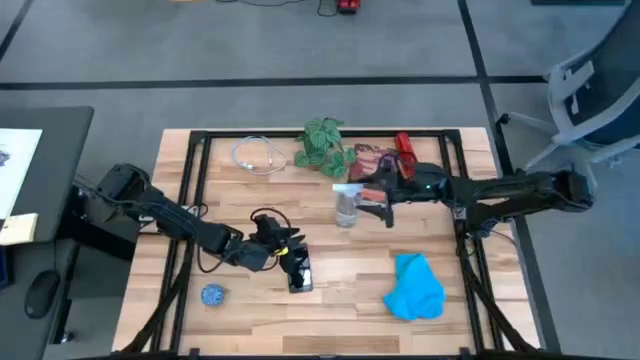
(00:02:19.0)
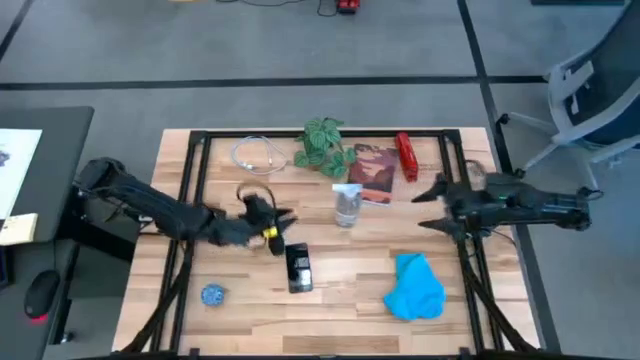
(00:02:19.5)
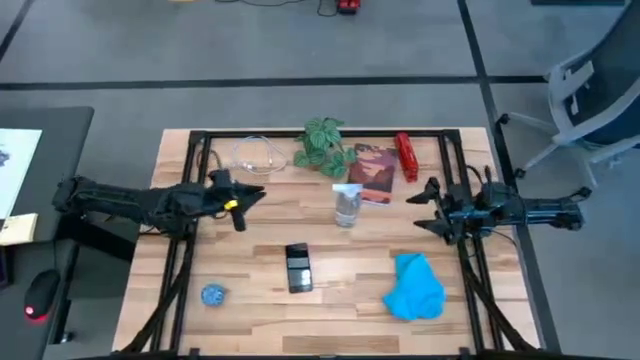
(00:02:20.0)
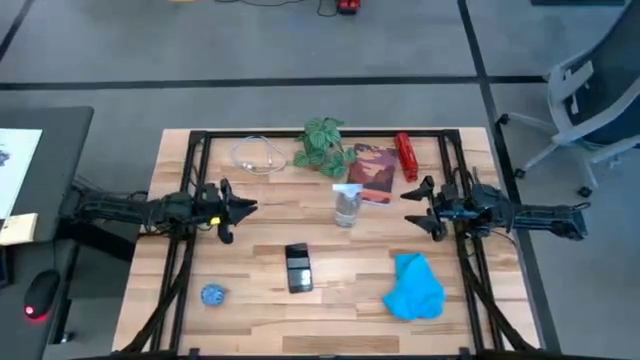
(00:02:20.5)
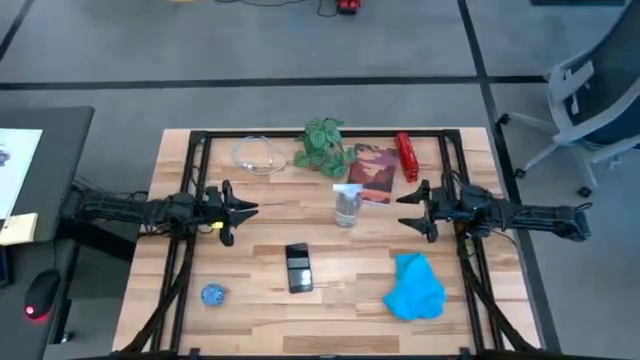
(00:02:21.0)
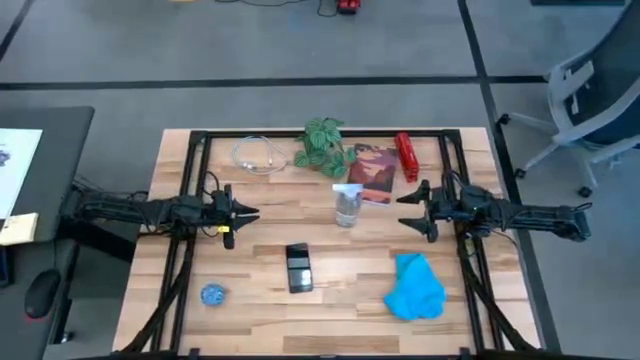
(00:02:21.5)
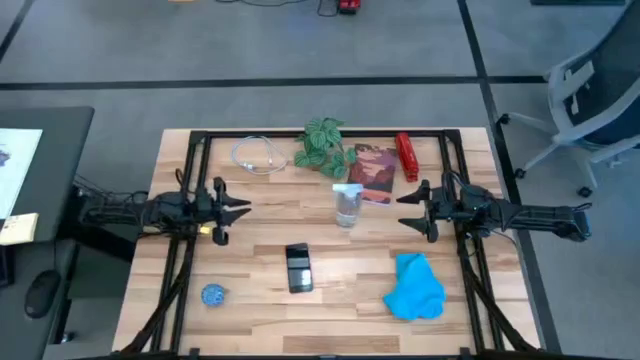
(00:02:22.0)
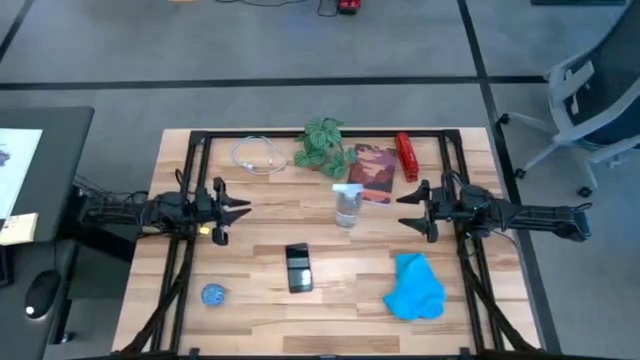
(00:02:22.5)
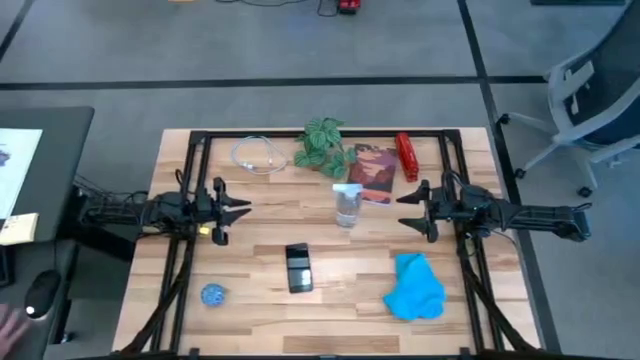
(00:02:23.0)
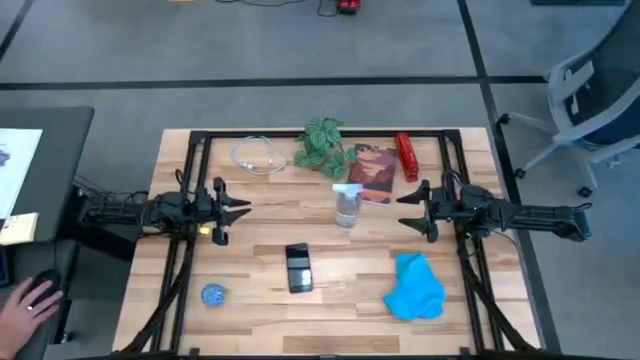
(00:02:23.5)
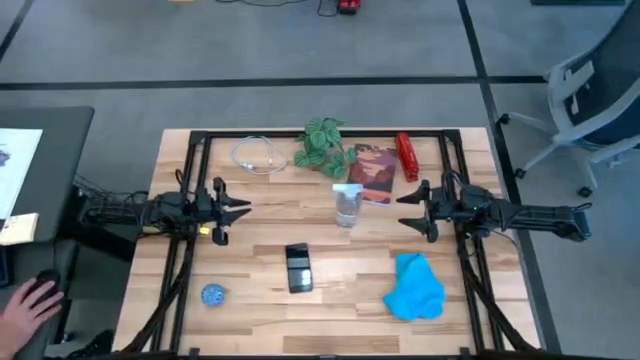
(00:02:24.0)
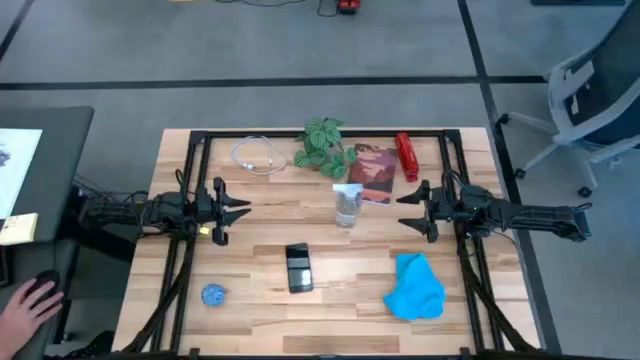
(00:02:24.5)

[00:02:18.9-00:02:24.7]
Task: Apply microfiber cloth
Return to Home Position

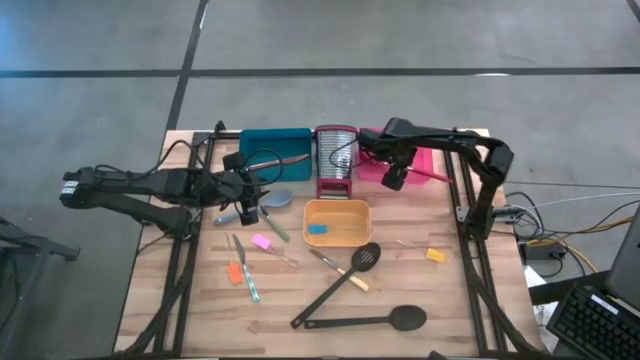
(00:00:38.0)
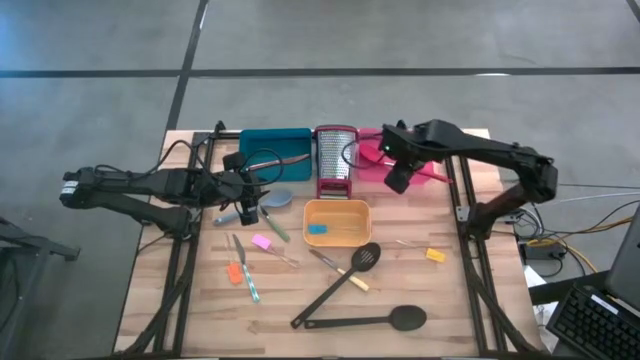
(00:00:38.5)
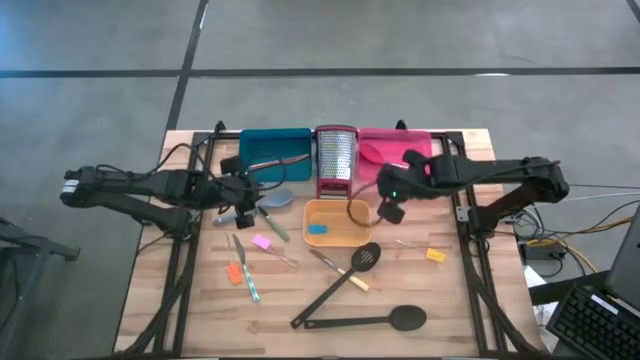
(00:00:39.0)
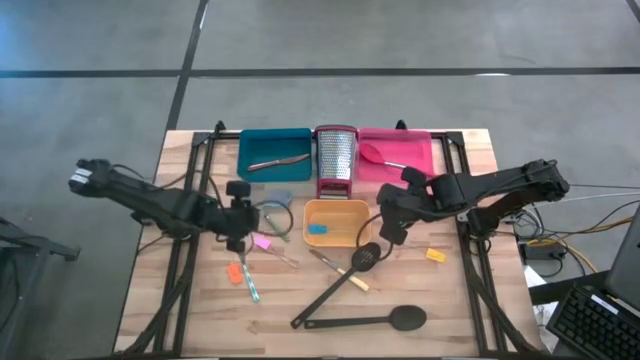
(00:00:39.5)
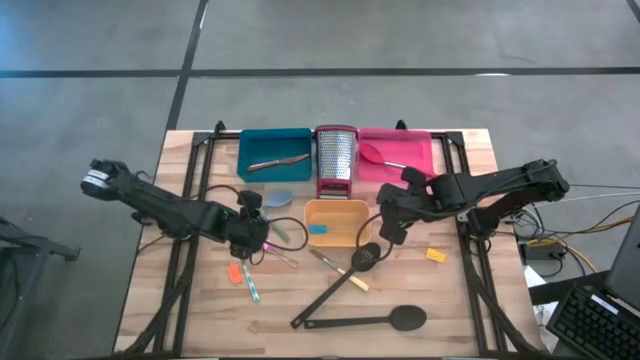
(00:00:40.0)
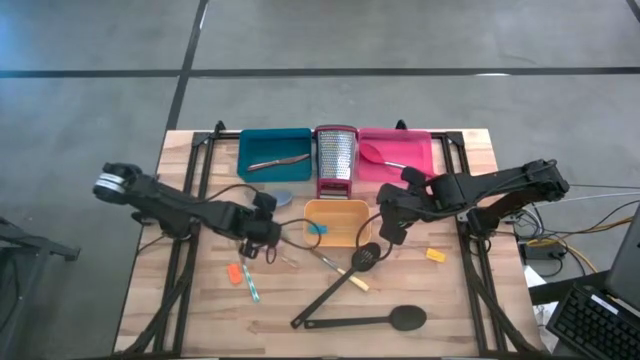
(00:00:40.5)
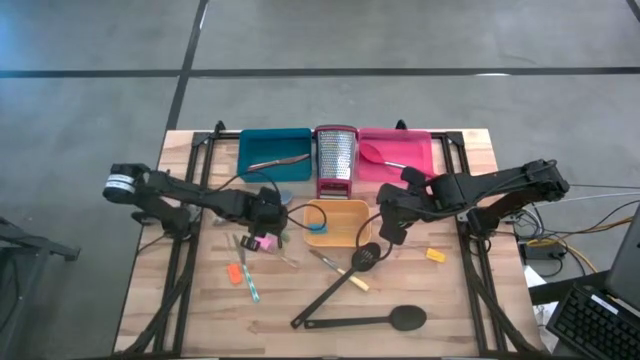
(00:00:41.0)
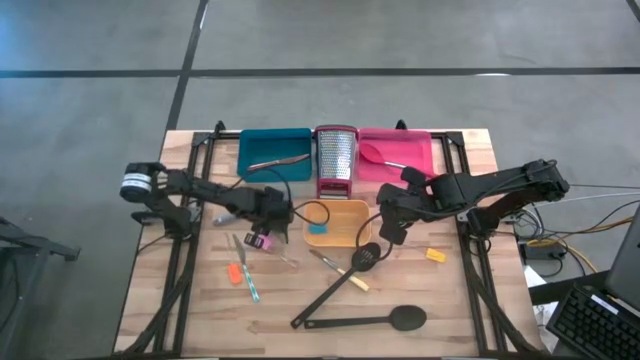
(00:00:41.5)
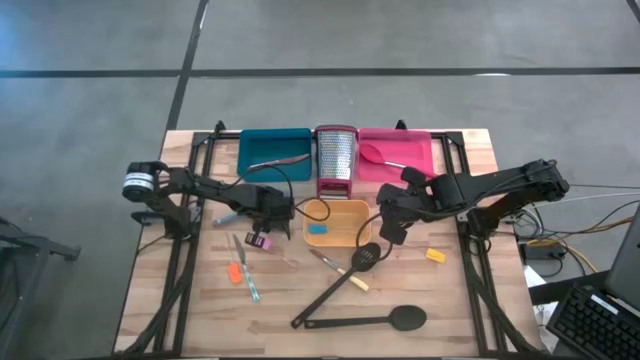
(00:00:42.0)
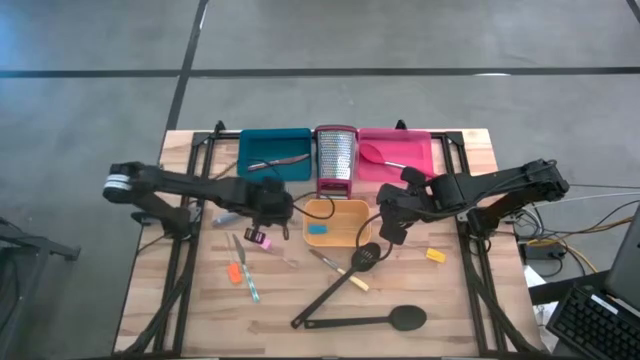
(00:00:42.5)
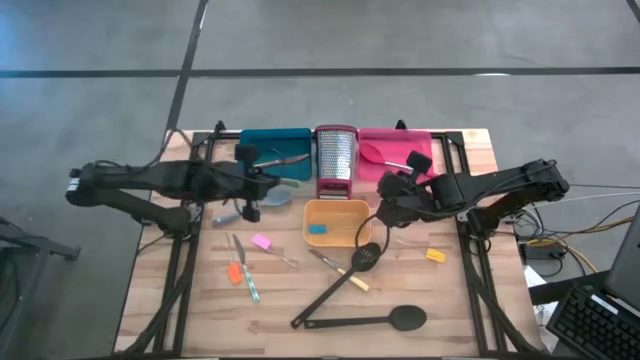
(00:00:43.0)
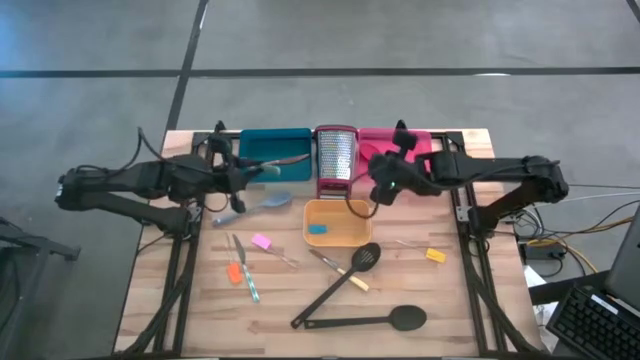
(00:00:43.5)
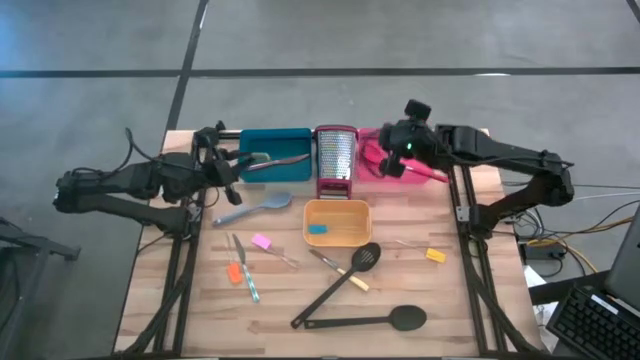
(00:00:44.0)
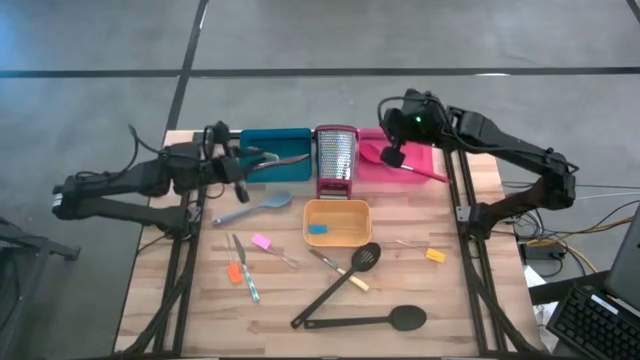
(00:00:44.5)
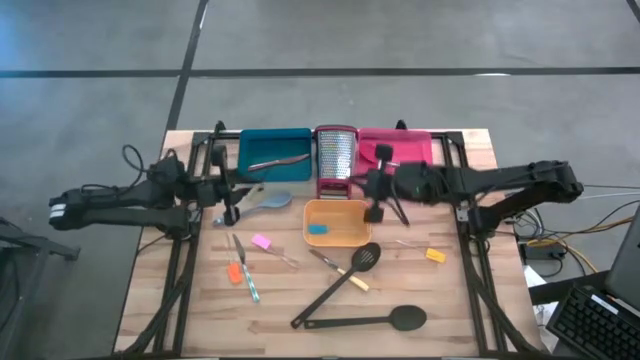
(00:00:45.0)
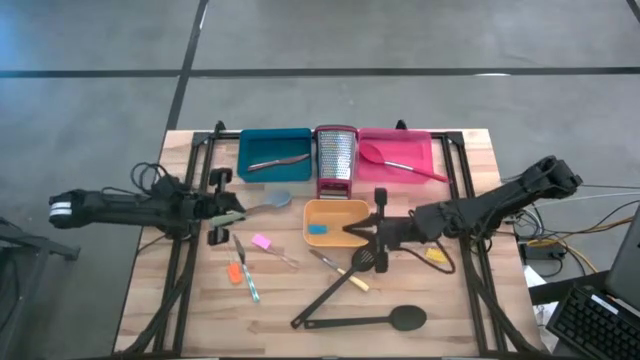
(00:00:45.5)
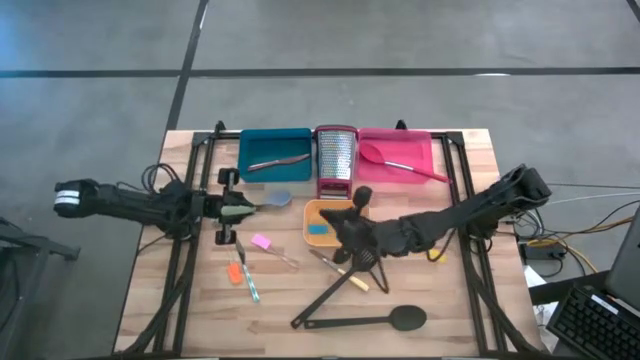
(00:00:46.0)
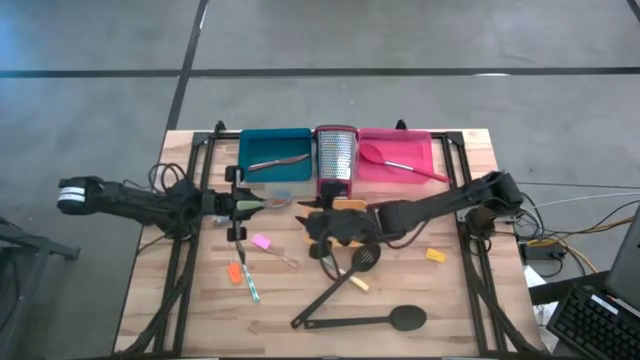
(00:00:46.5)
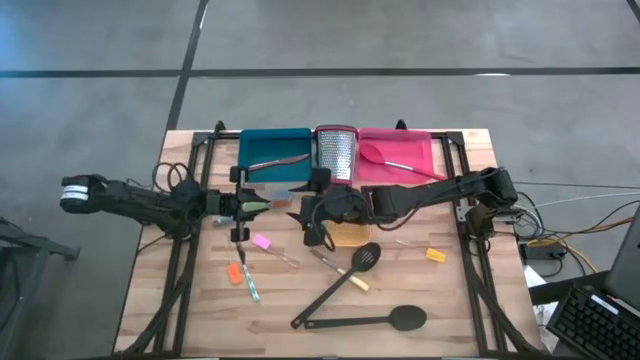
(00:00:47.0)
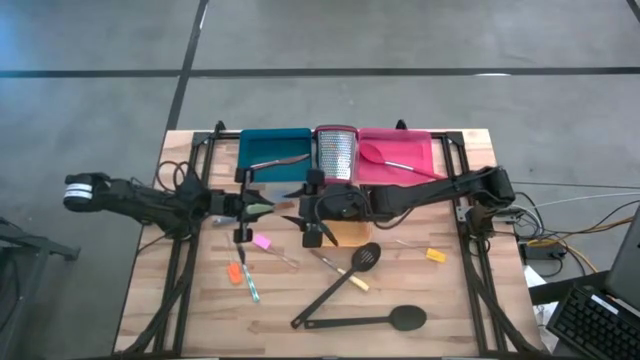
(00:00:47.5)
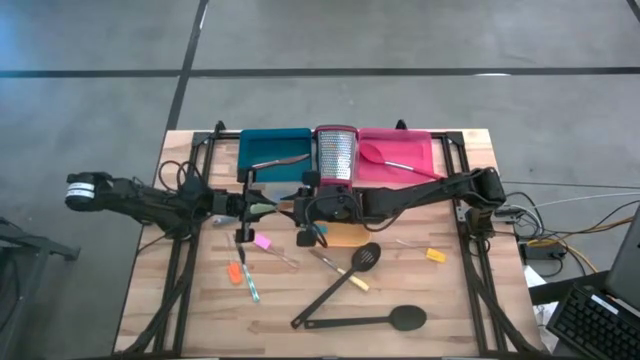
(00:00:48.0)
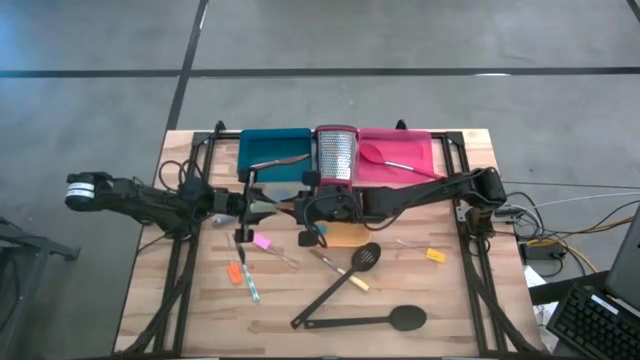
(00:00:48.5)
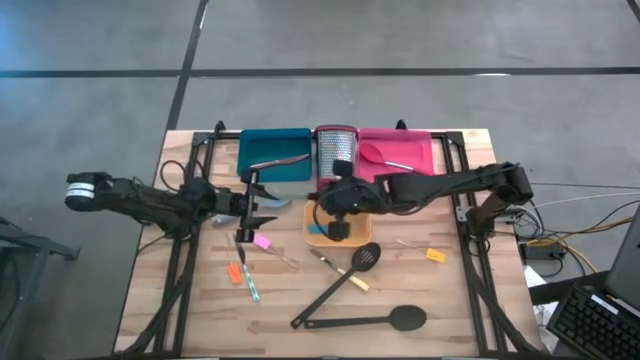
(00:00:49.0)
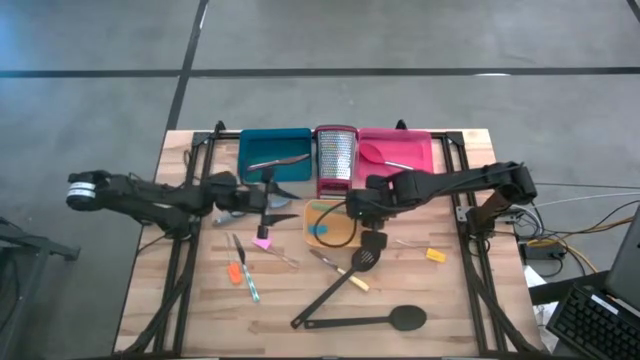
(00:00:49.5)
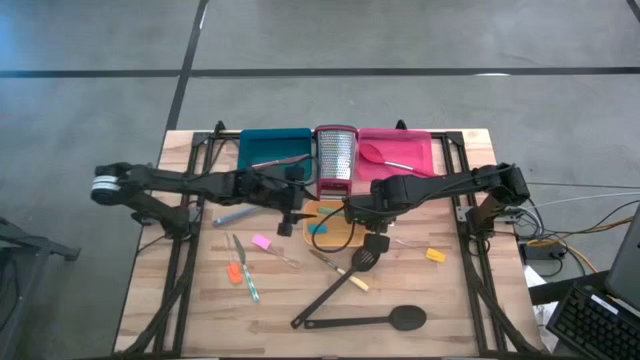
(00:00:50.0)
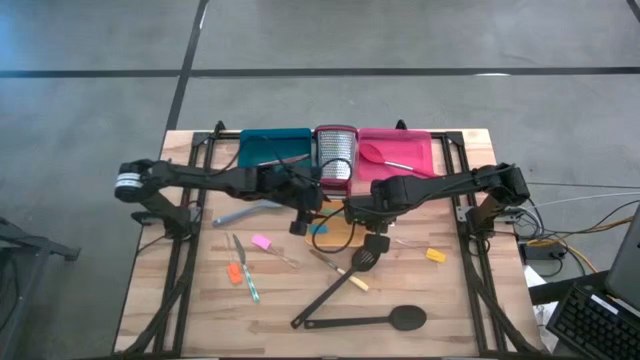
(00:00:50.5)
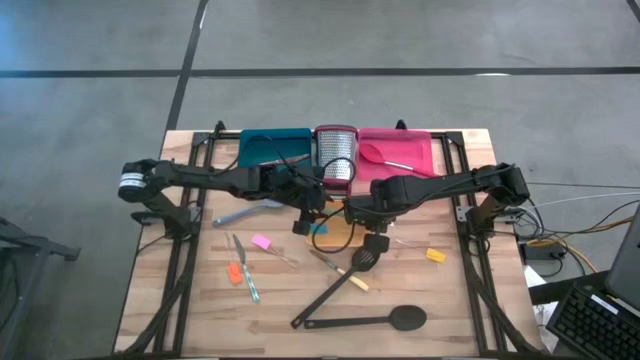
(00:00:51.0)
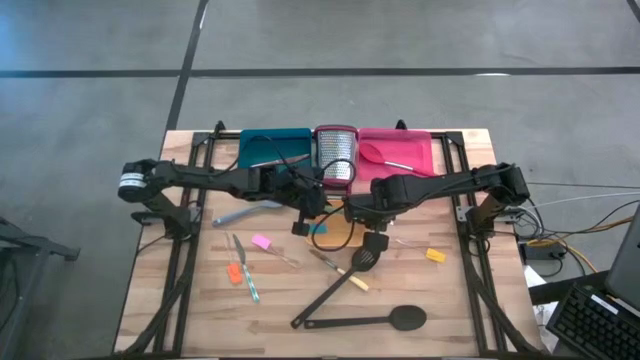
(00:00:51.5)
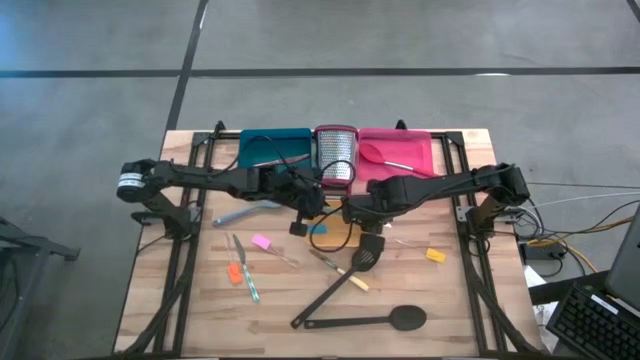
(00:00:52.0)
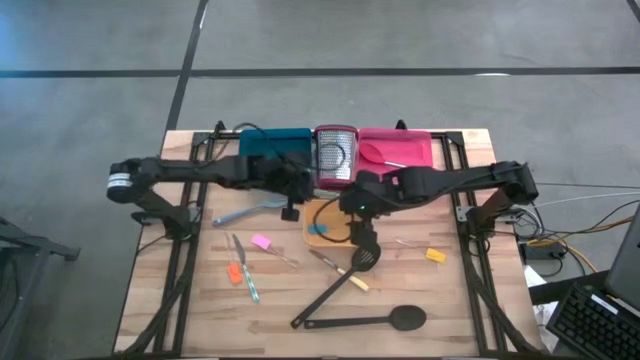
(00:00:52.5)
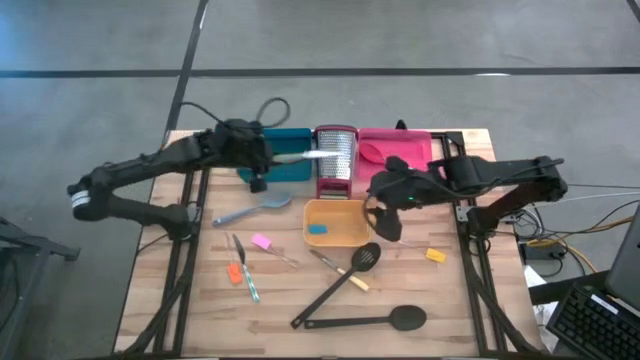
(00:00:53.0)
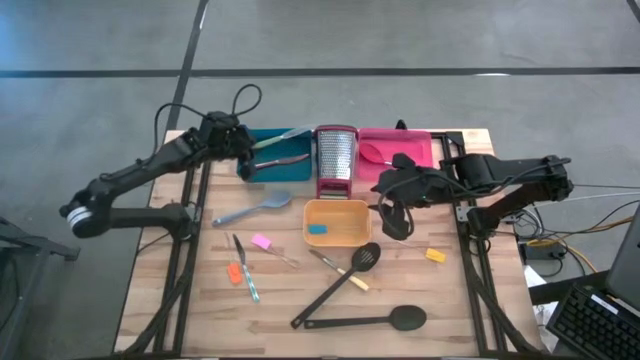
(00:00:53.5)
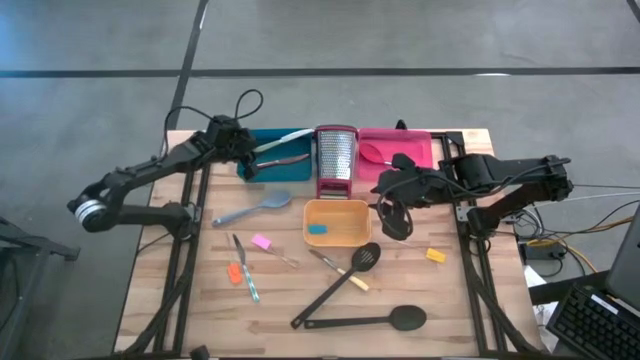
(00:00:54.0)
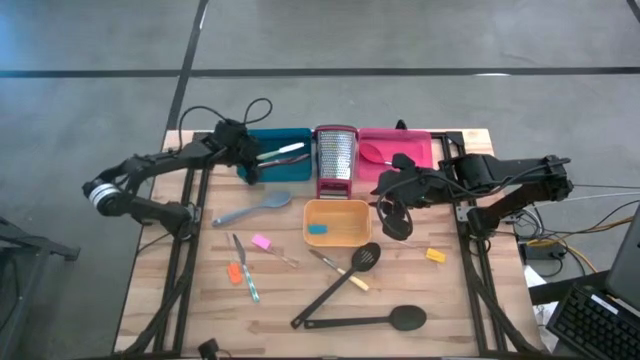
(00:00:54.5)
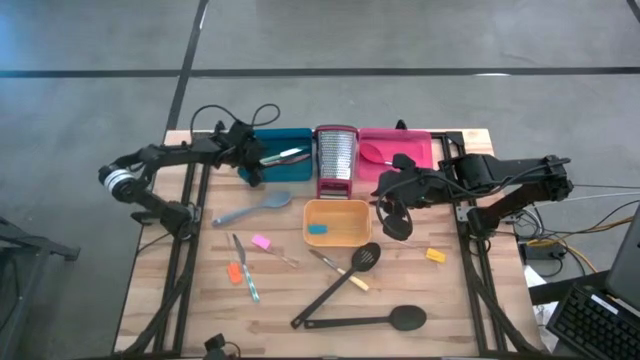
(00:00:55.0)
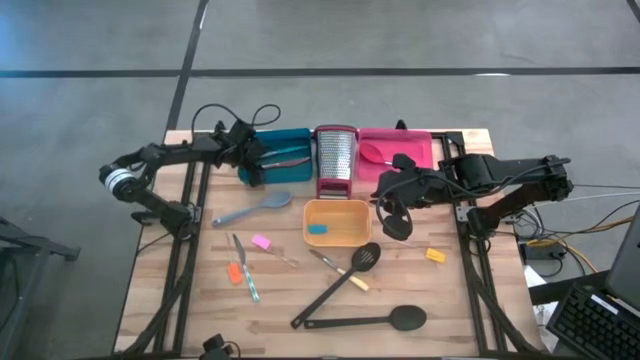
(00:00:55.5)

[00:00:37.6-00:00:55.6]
Task: Pick & Place Kitchen Items
Put the green table knife into the blue bin
